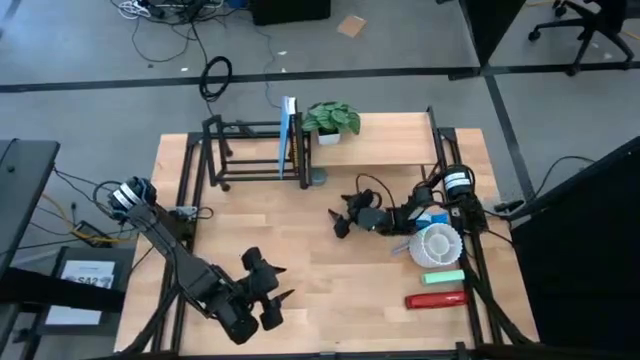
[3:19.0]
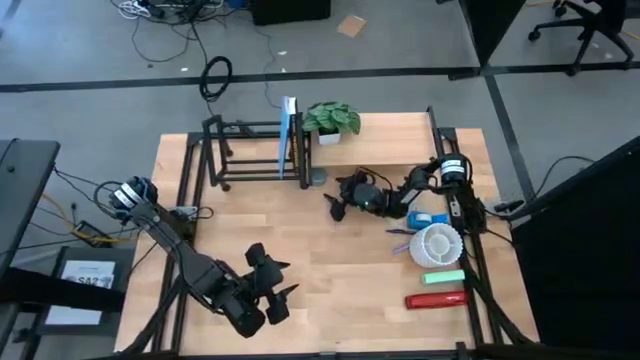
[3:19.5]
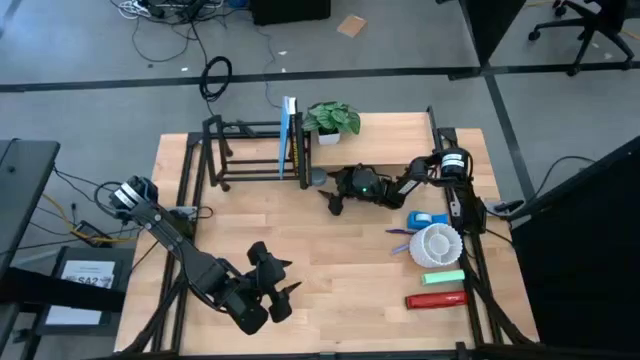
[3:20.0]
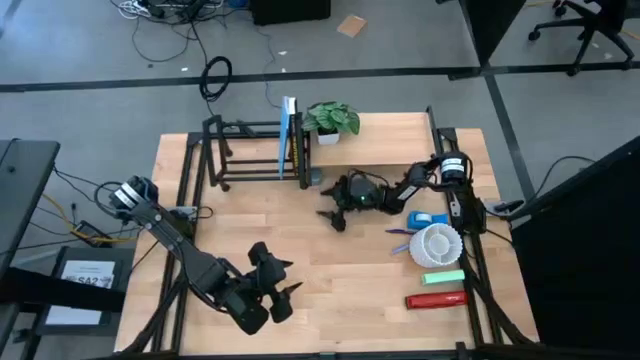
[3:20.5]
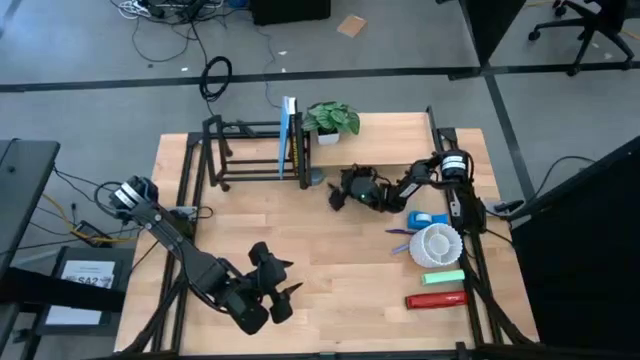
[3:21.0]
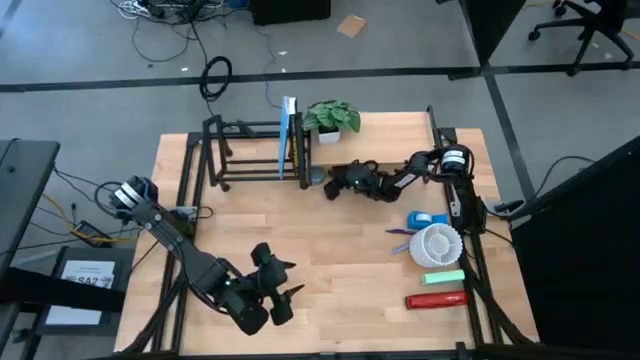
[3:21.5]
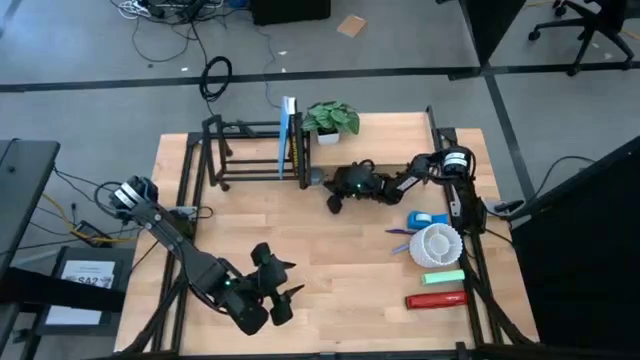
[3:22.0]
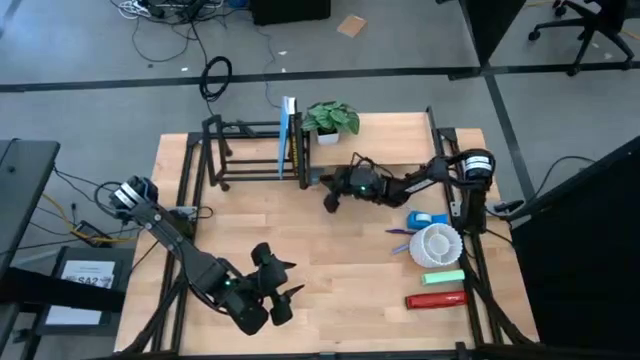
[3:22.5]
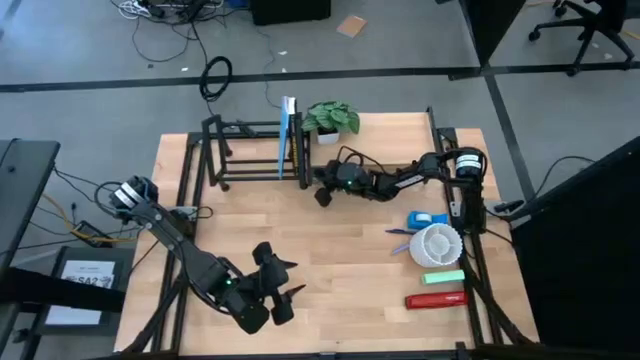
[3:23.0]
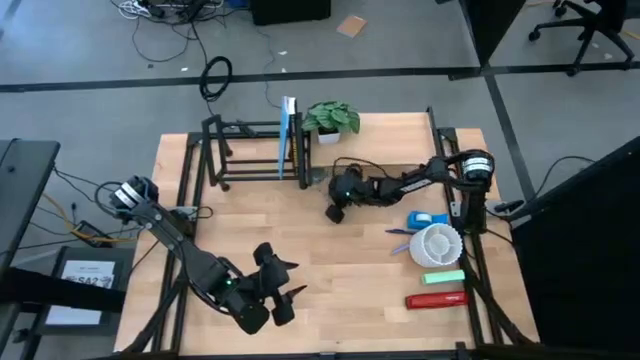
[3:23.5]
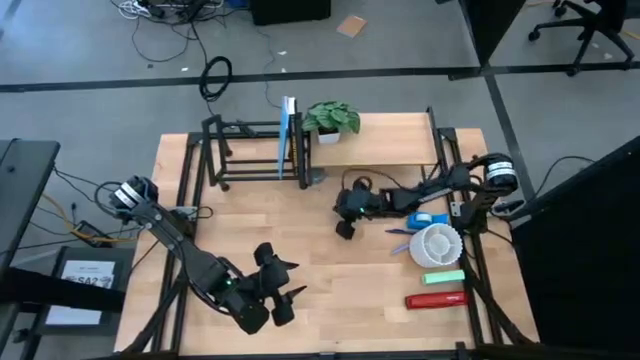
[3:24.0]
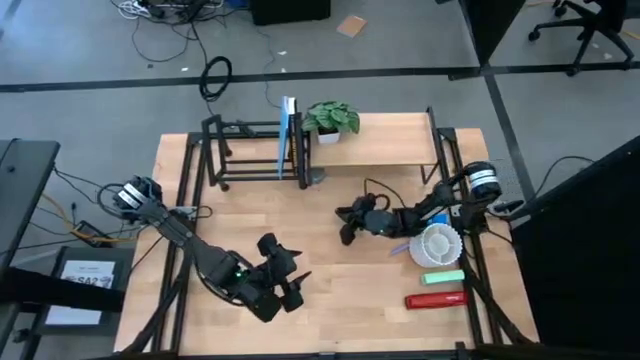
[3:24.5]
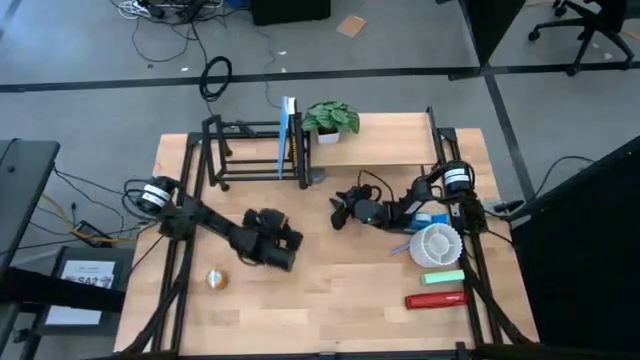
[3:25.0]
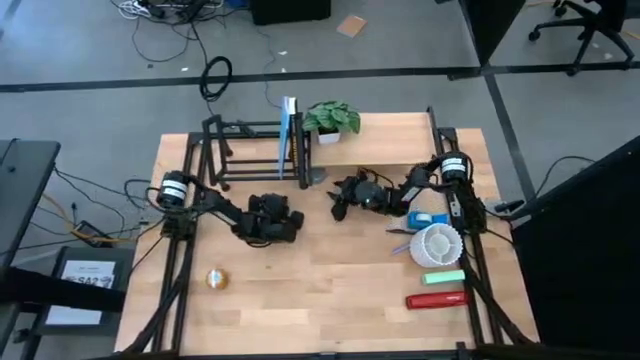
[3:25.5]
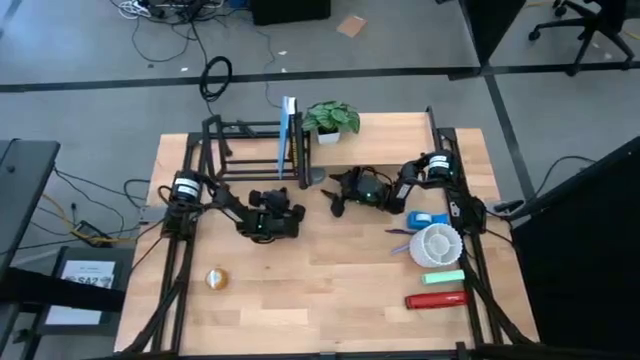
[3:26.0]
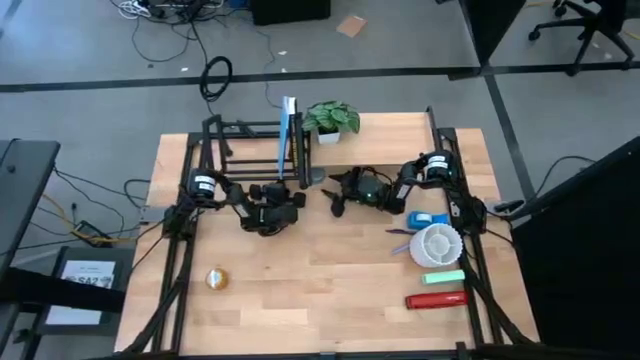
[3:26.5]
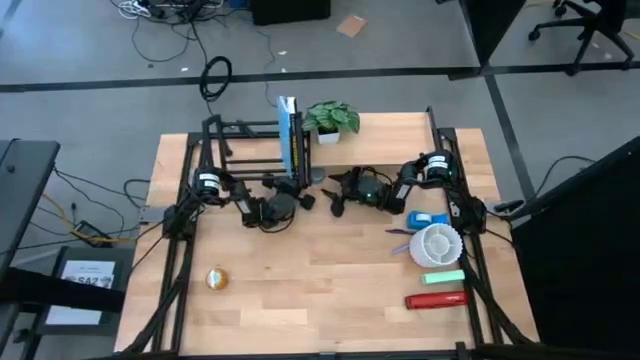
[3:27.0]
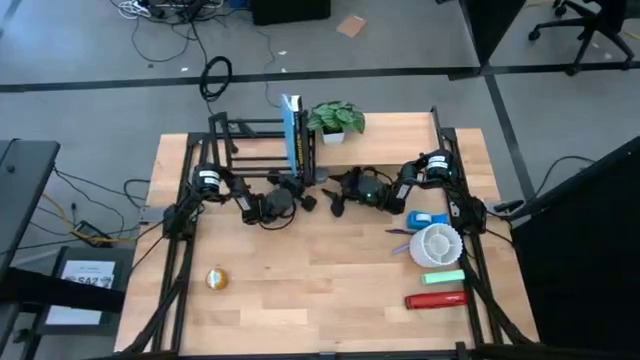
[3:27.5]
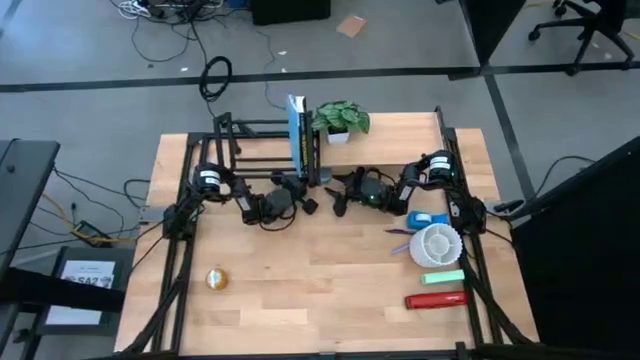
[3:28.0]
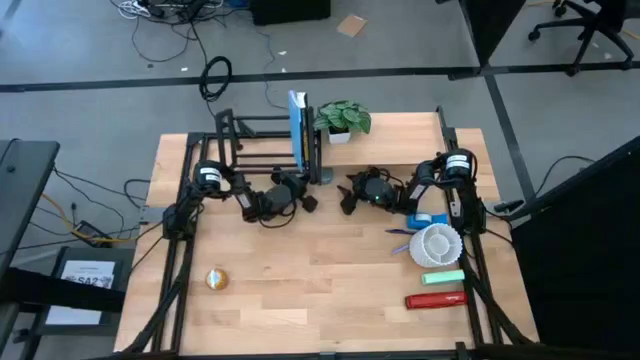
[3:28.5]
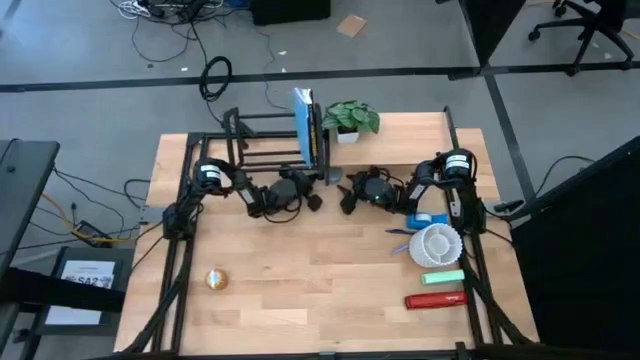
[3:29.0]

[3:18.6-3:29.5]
Task: Stock shelves
Remove the blue scented candle from under the shelf

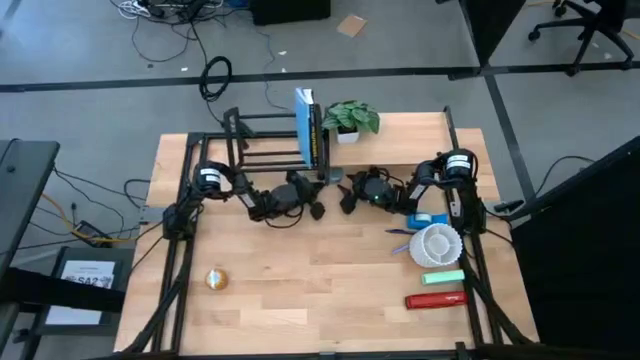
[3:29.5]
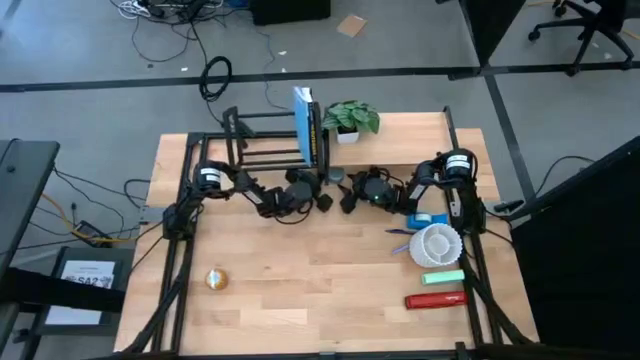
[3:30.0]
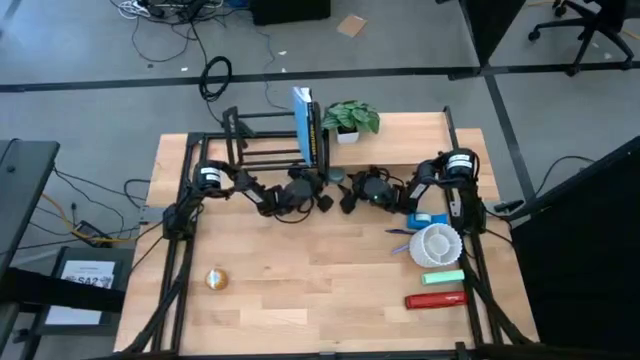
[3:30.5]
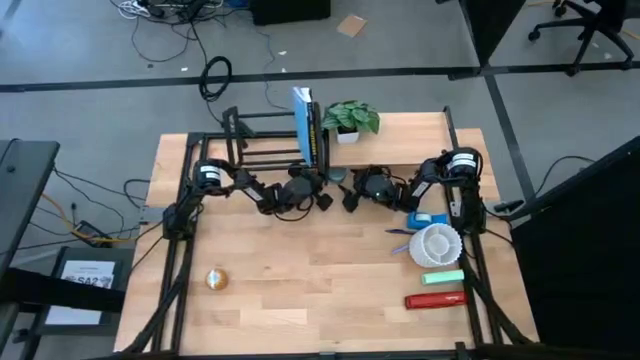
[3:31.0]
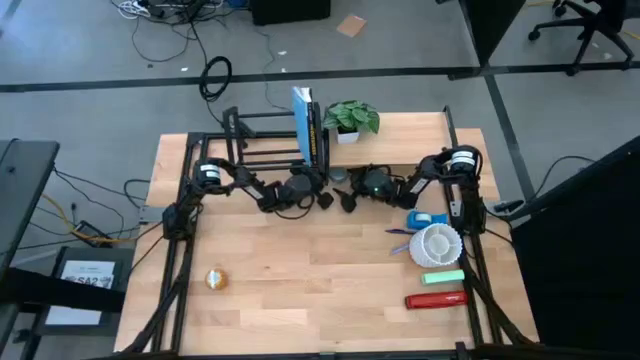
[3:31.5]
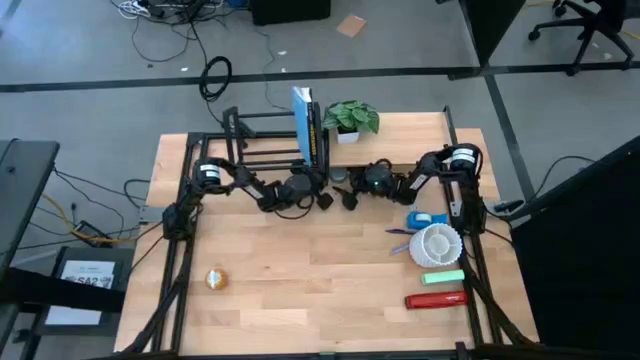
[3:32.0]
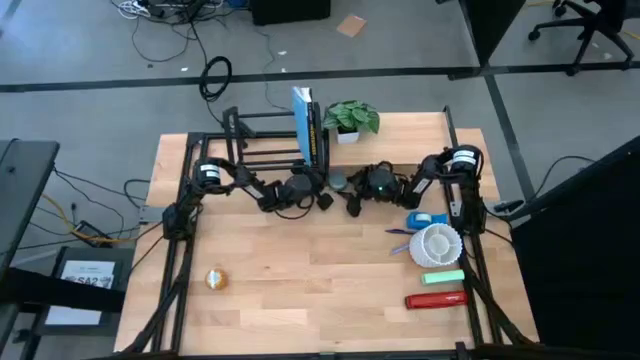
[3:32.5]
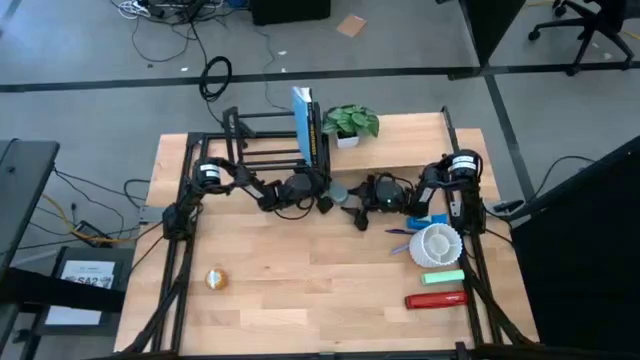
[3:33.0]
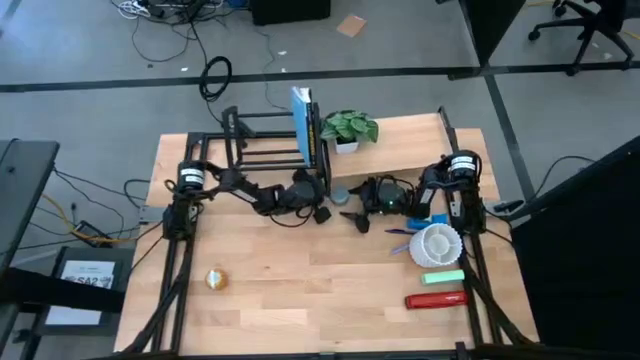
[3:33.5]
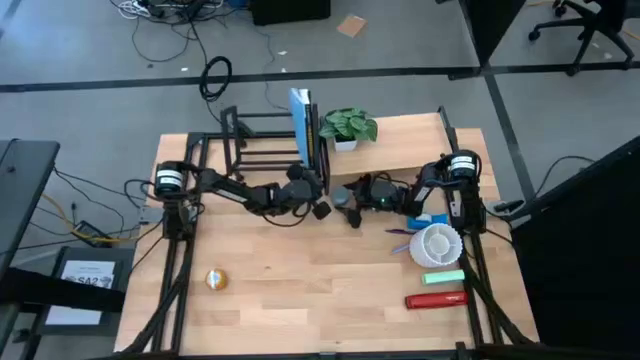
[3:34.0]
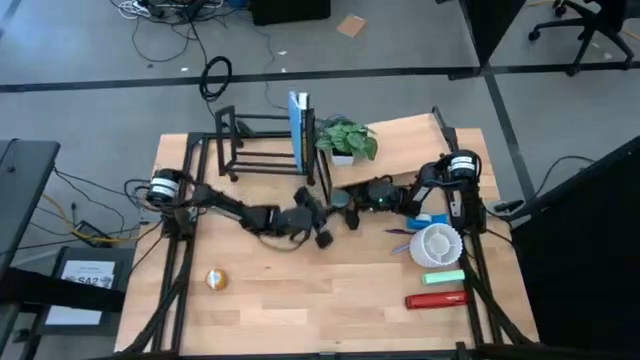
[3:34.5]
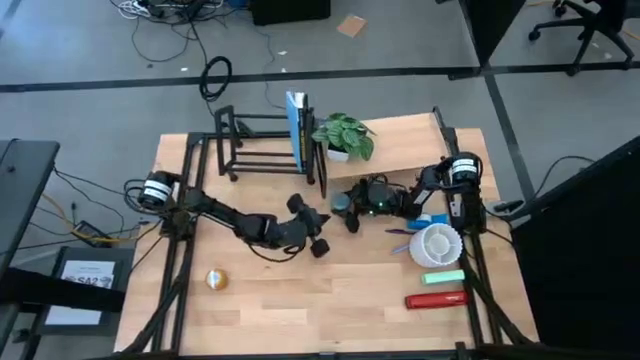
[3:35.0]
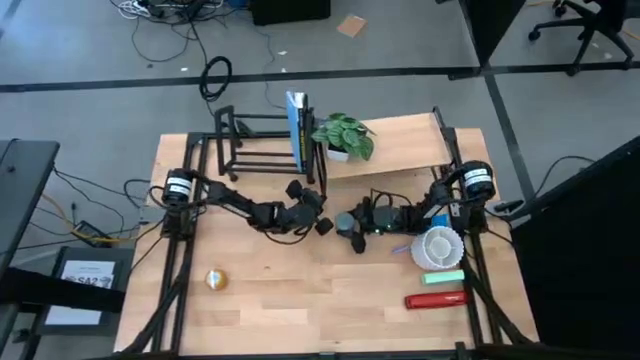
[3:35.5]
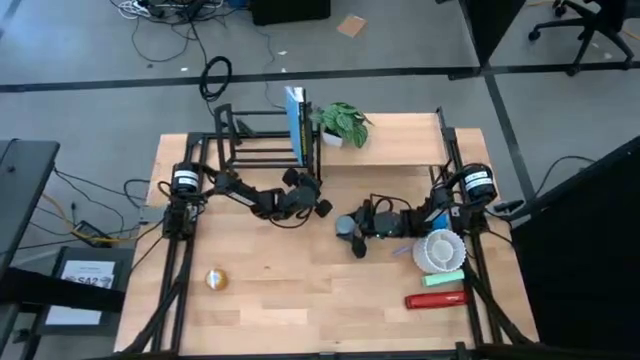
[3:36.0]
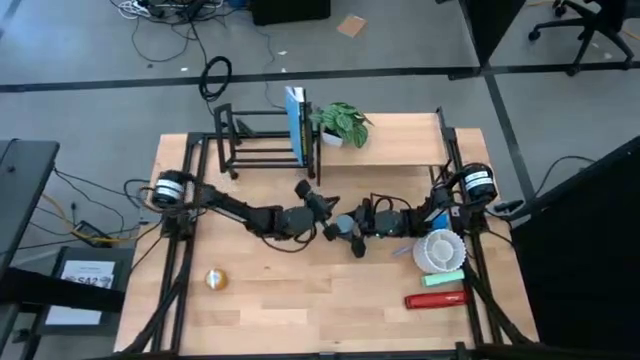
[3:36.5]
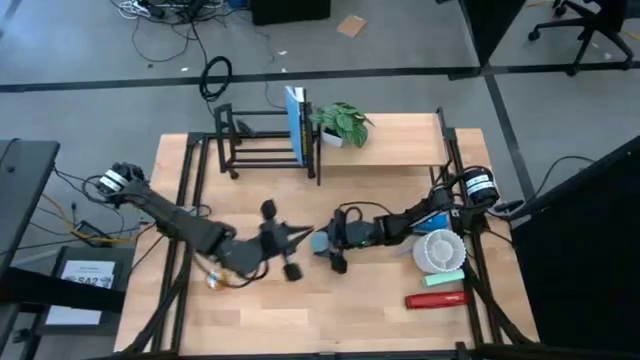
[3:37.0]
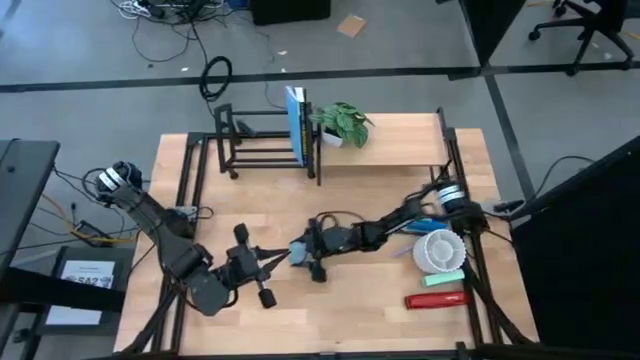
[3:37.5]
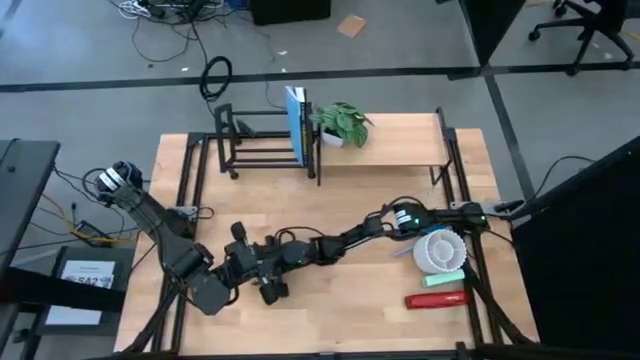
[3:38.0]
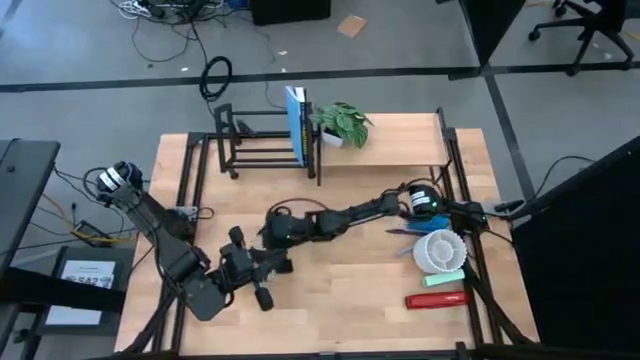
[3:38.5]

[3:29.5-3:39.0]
Remove the blue scented candle from under the shelf

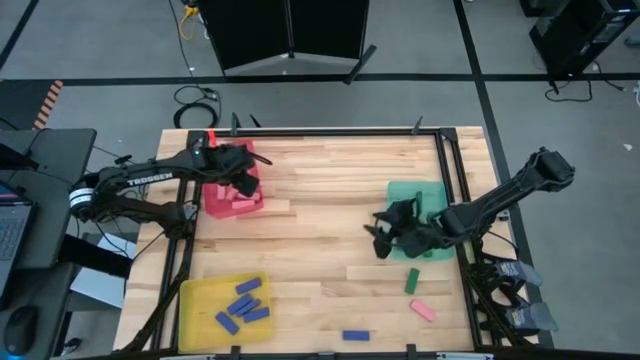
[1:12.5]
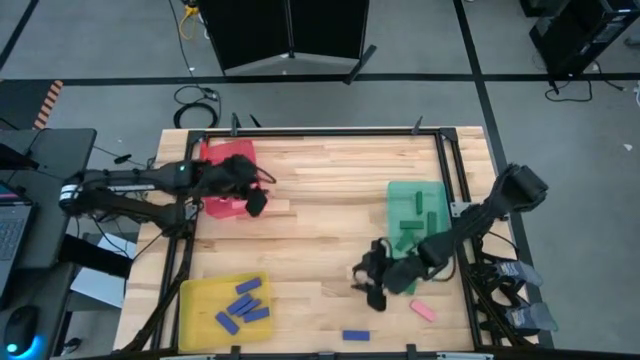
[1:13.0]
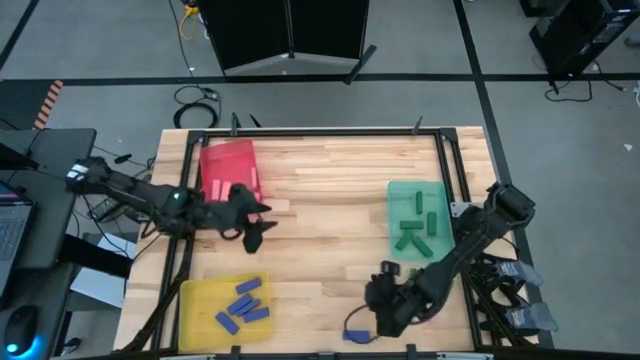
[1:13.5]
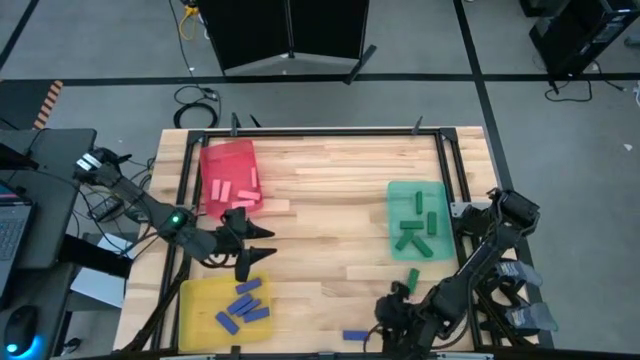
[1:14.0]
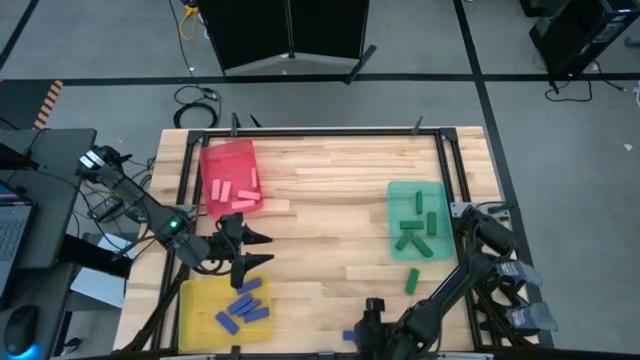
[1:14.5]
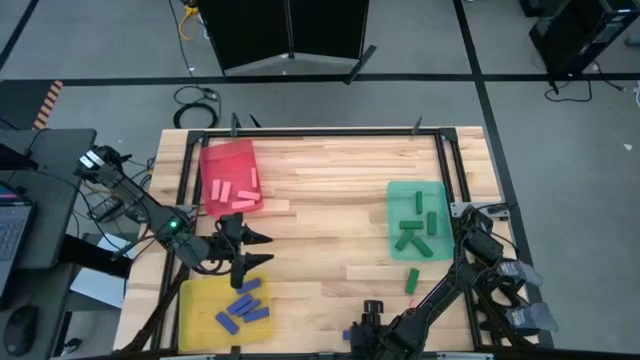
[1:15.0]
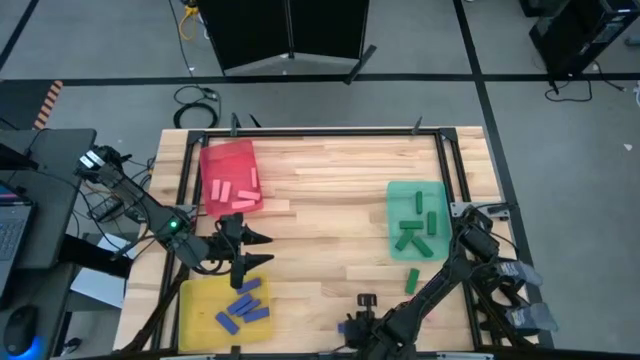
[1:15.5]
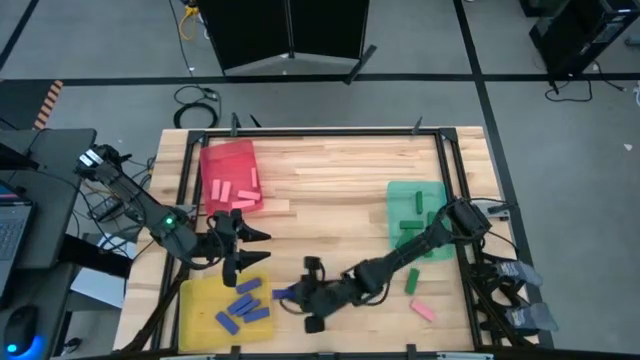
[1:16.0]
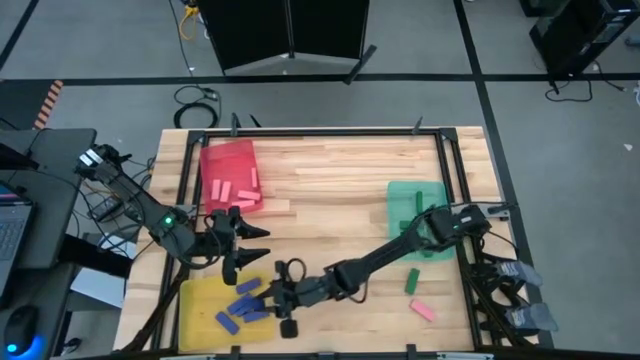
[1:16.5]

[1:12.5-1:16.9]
Task: Sort blocks
Put the blue block into the yellow bin
